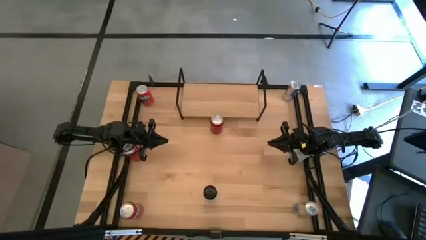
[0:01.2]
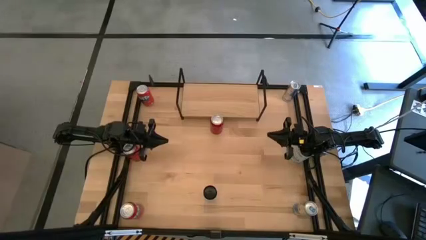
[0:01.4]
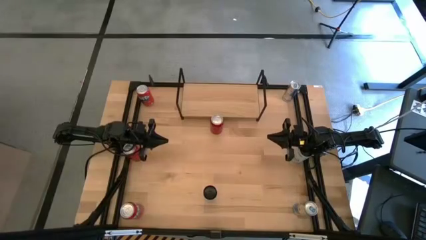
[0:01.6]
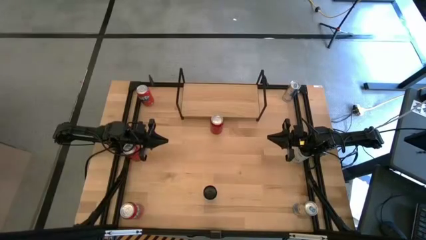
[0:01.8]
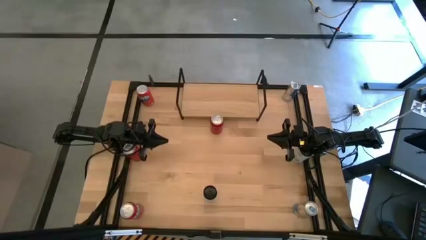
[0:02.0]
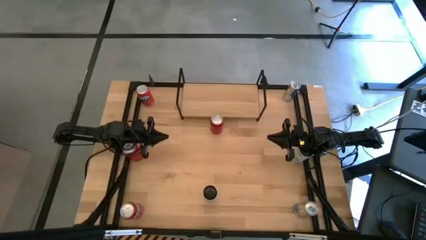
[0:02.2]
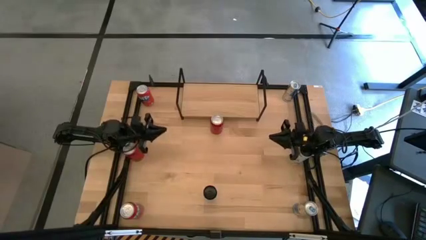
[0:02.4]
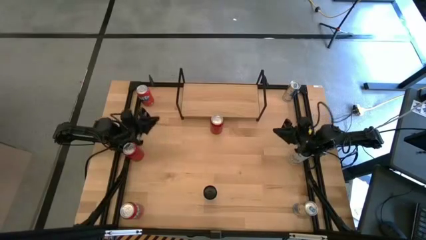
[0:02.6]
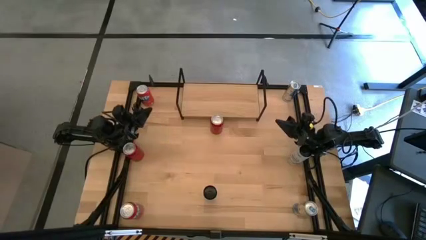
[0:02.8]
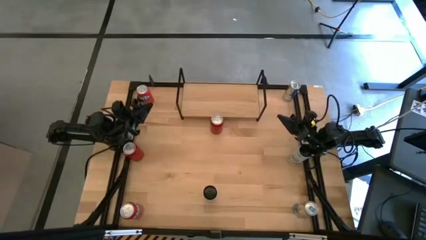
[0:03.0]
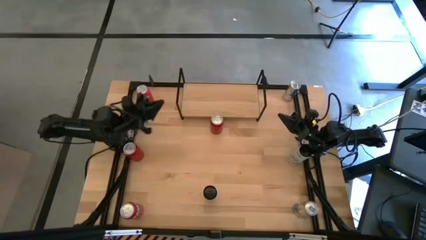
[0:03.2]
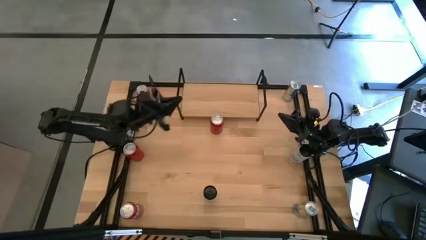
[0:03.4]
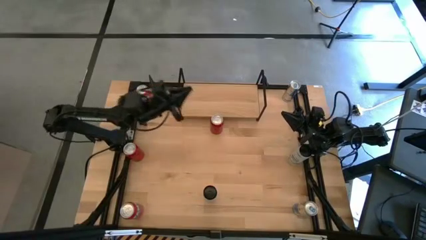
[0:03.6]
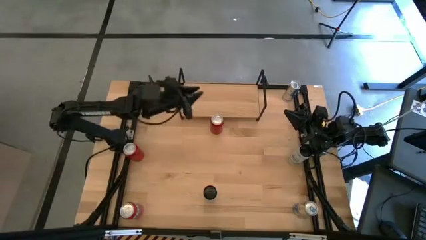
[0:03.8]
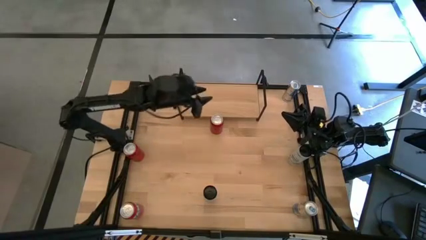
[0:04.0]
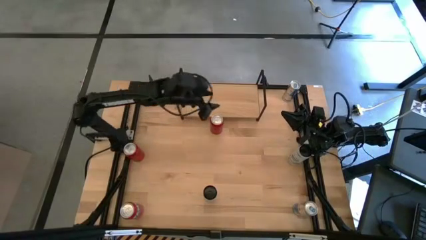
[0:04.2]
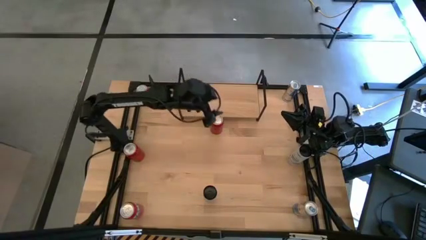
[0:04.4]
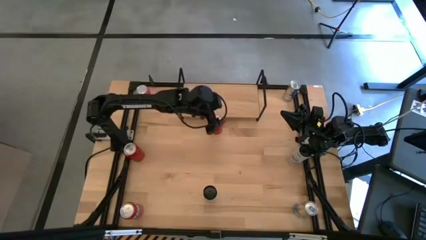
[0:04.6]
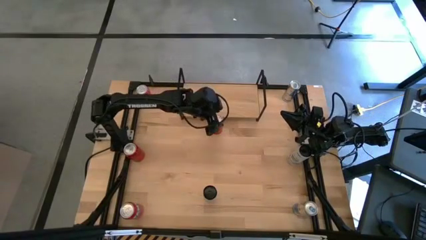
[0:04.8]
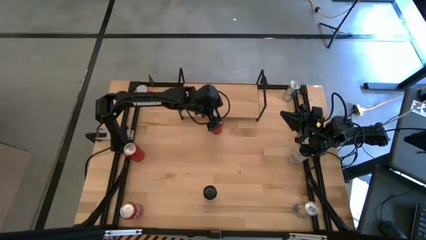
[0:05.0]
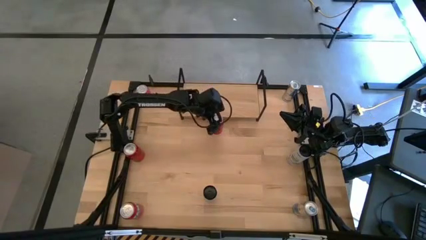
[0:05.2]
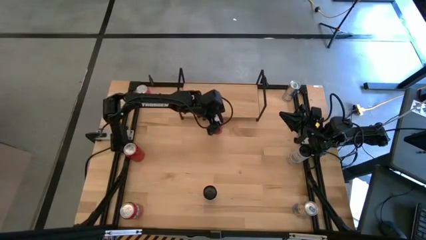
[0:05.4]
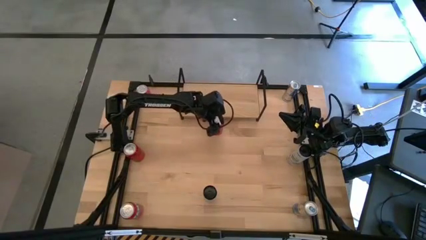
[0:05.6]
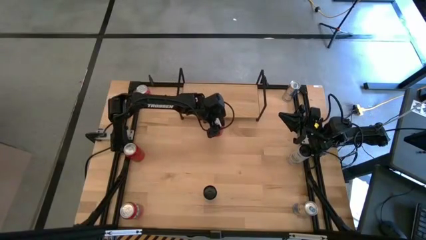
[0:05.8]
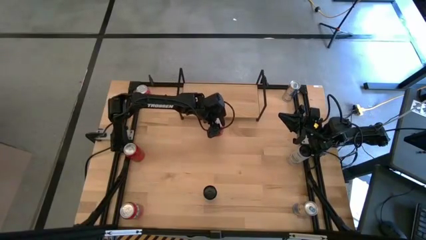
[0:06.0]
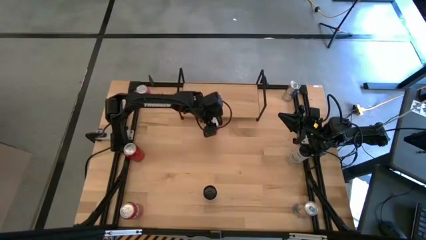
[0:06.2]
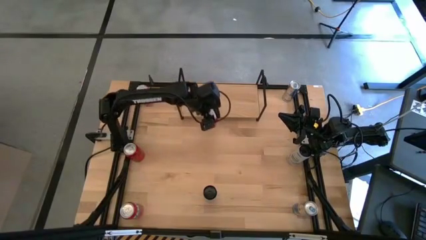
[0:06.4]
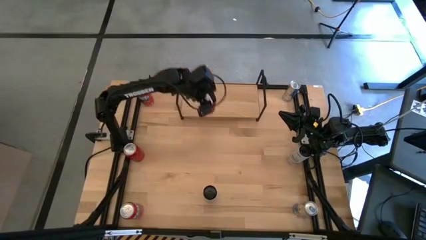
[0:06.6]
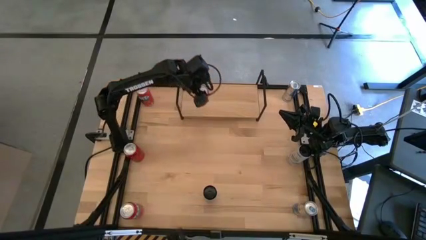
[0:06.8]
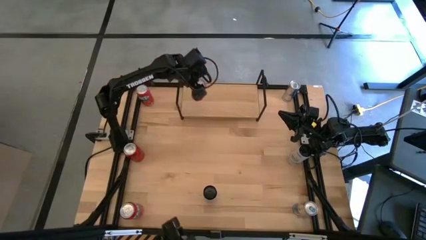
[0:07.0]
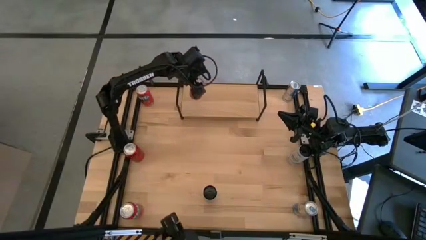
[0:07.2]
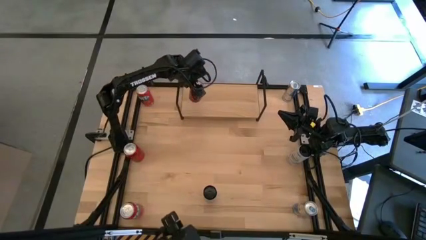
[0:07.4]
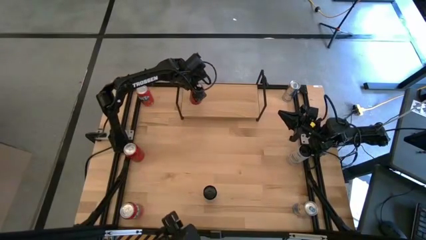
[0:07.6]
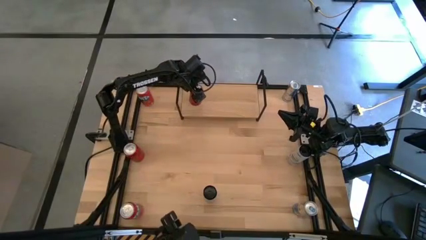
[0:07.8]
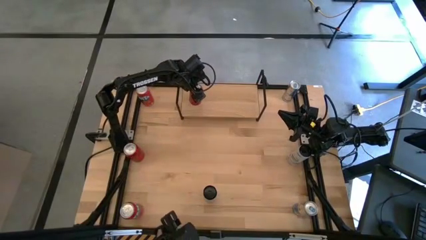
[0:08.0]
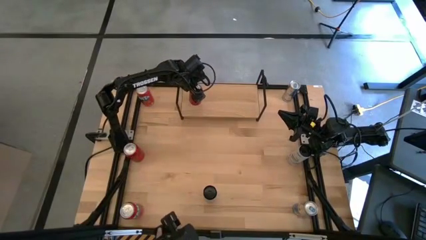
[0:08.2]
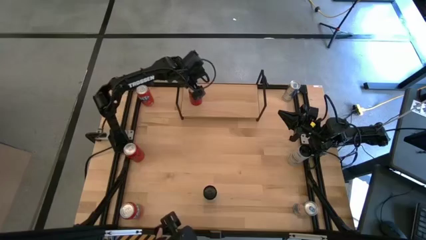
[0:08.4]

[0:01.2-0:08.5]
Task: Place canned beverage on shelf
Put the top red soda can on the shelf

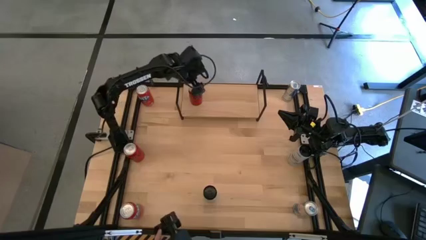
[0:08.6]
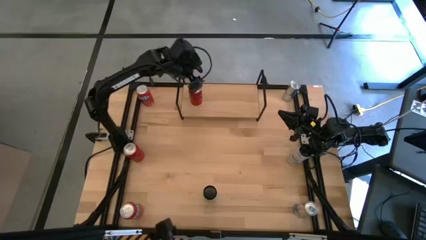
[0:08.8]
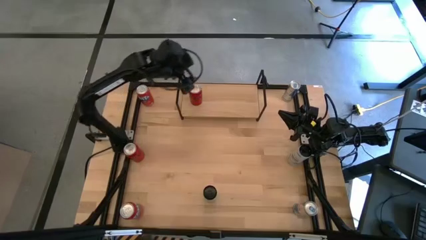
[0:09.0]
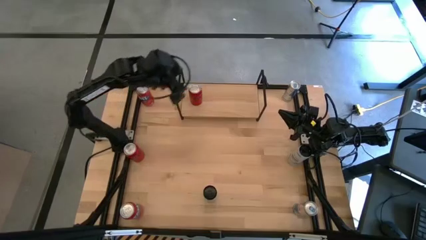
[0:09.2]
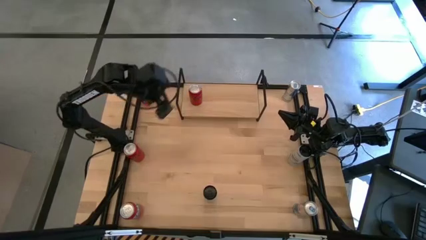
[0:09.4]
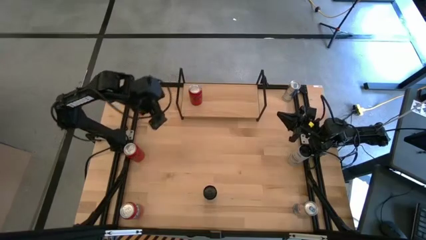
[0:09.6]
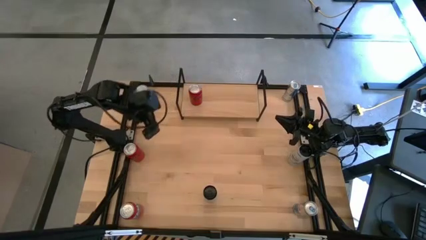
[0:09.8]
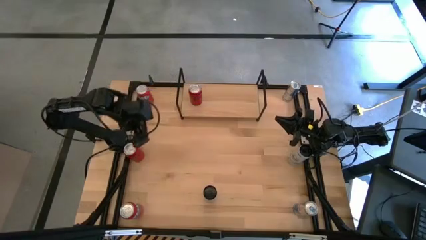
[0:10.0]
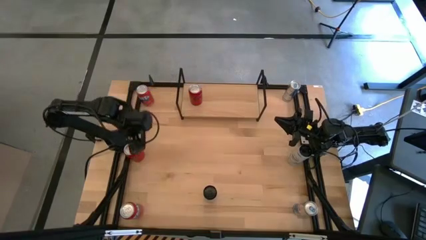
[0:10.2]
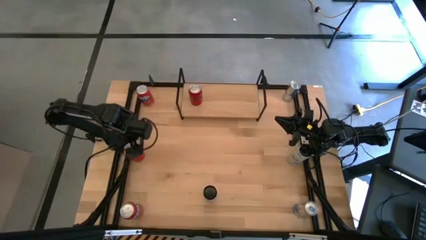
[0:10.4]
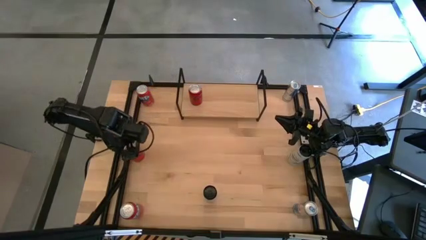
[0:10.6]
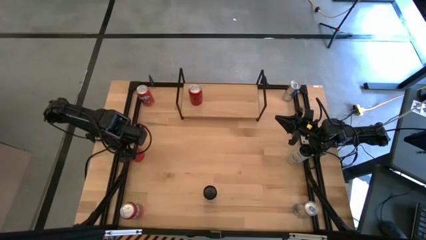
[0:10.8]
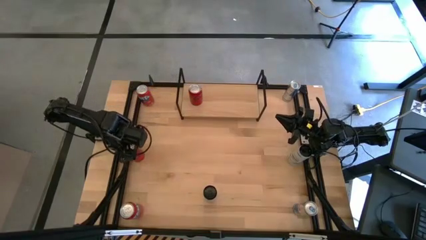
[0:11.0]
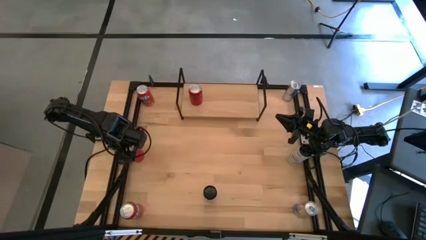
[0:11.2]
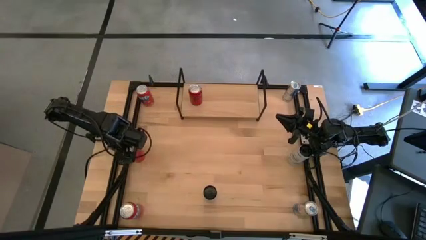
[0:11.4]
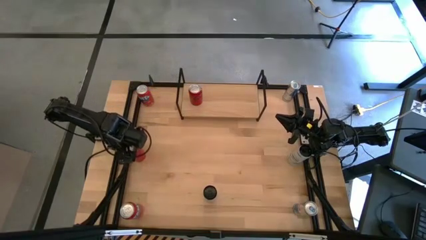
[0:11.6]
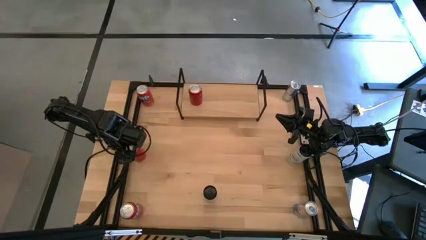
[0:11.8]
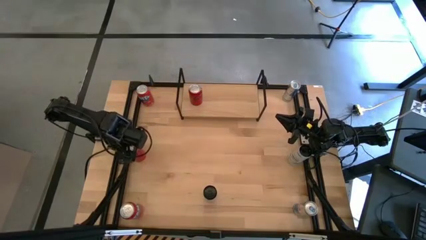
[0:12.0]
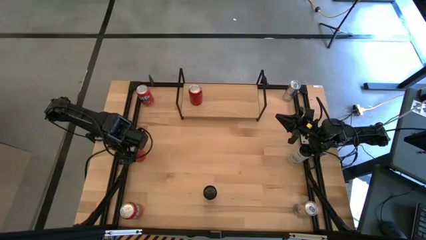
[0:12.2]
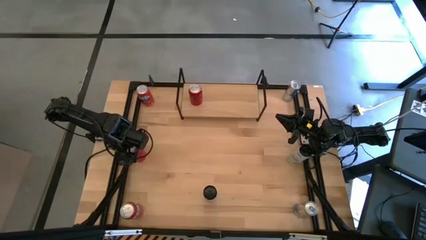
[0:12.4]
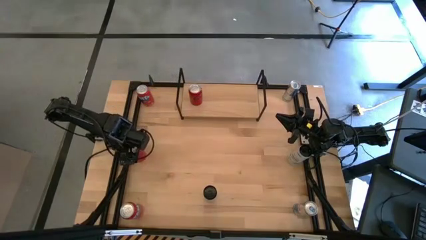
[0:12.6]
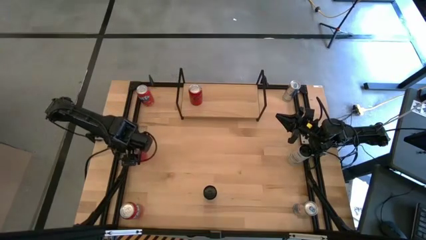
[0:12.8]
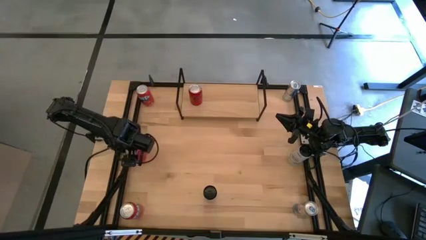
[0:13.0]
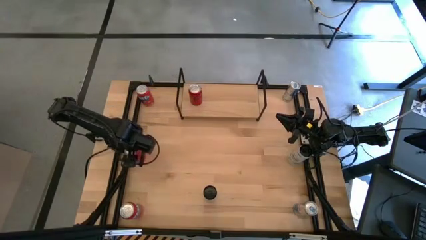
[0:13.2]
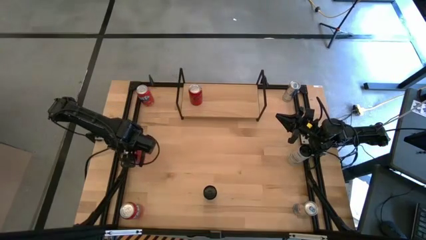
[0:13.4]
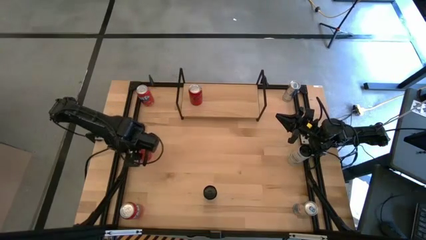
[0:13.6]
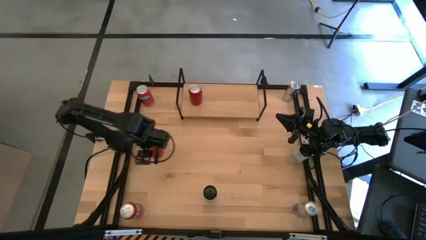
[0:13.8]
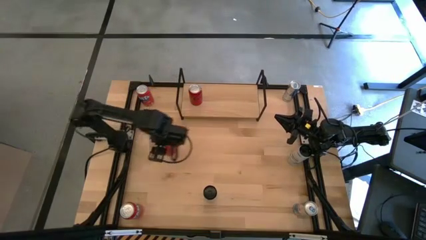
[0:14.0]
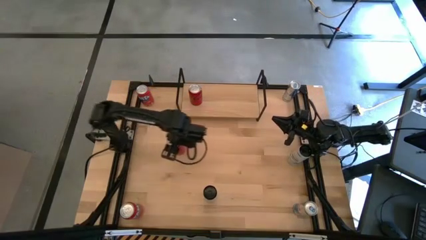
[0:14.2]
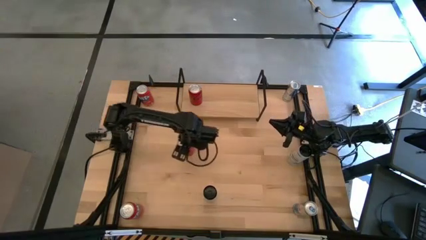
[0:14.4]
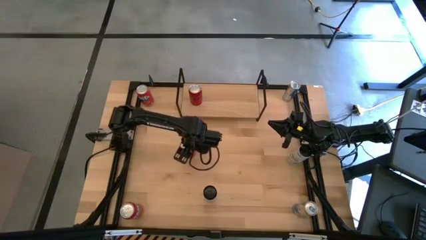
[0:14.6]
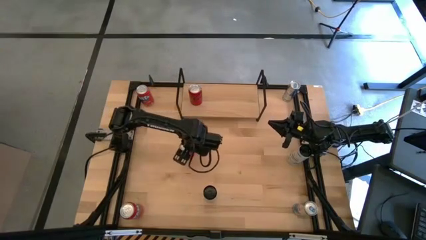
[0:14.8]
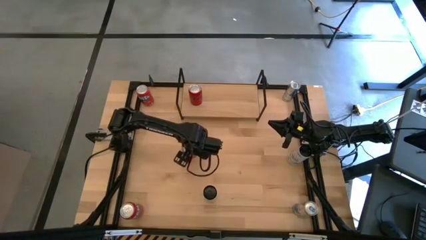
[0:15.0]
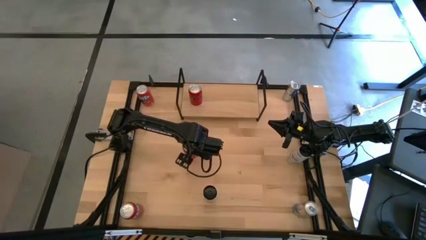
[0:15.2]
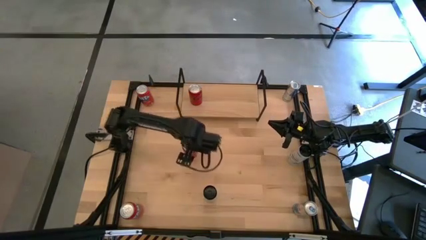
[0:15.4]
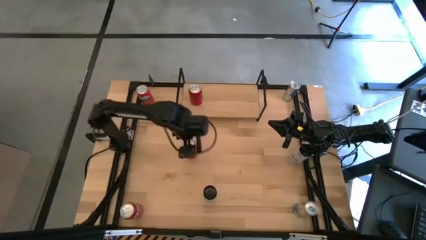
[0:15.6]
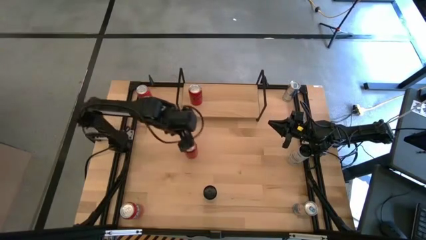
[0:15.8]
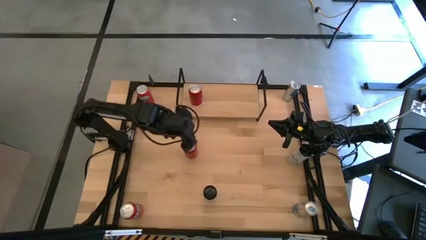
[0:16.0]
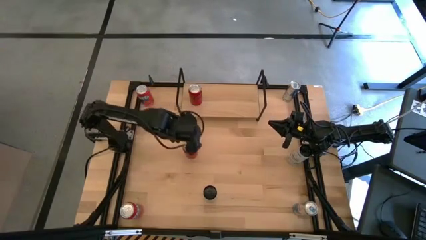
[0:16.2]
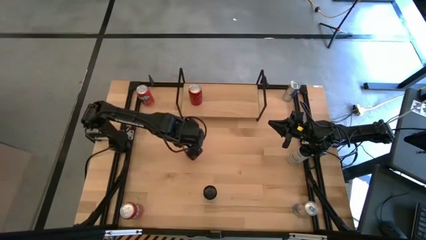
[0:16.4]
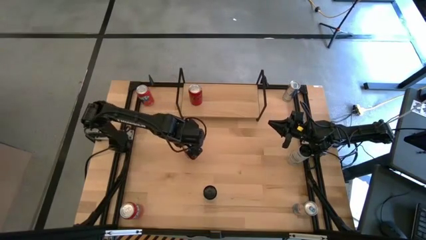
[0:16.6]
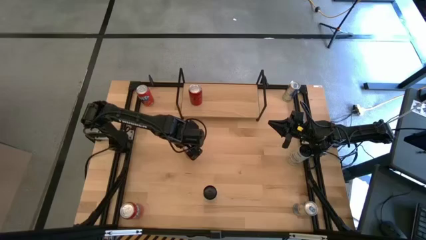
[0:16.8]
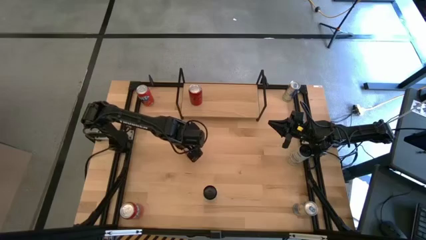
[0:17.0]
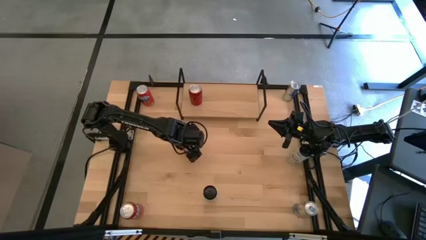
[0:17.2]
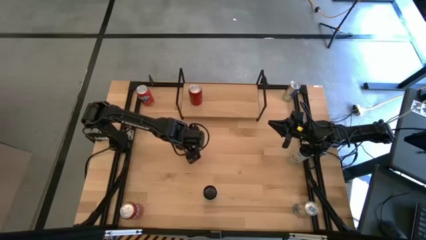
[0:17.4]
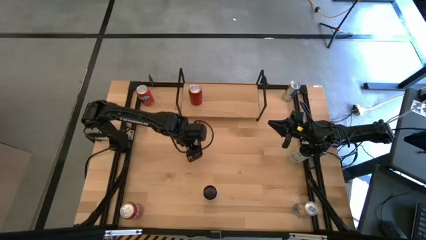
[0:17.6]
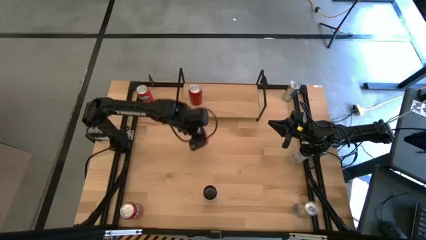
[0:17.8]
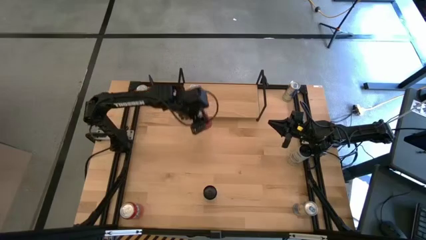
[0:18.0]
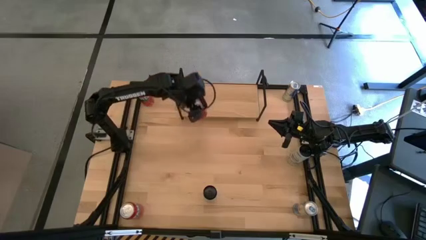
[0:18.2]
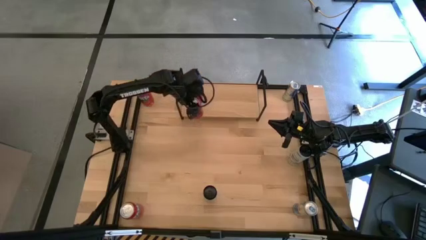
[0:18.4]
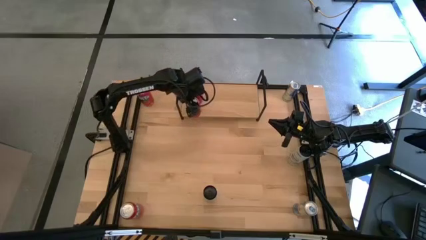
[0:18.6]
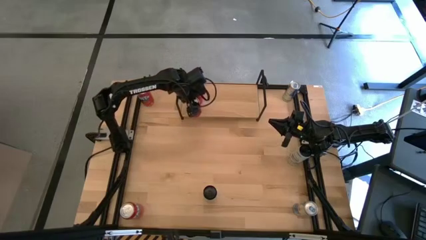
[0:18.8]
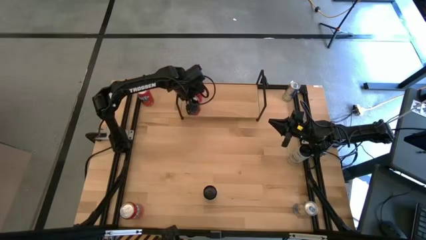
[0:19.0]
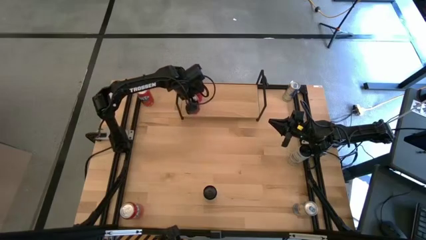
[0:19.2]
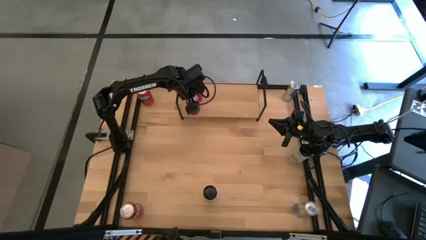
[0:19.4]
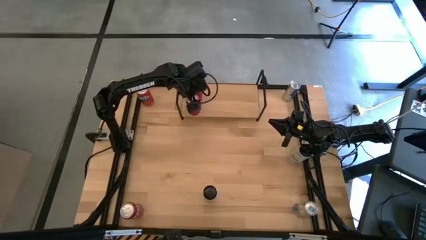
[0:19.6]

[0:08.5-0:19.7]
Put the red soda can on the shelf and align it with the other red soda can
